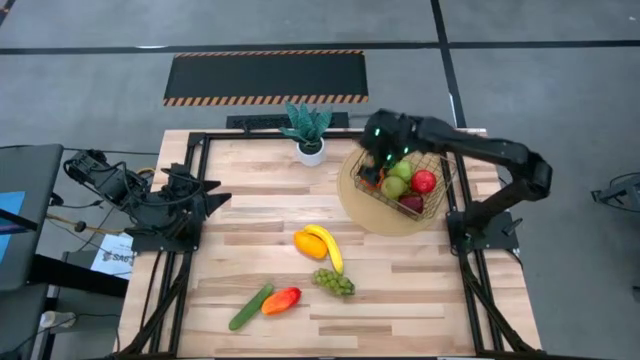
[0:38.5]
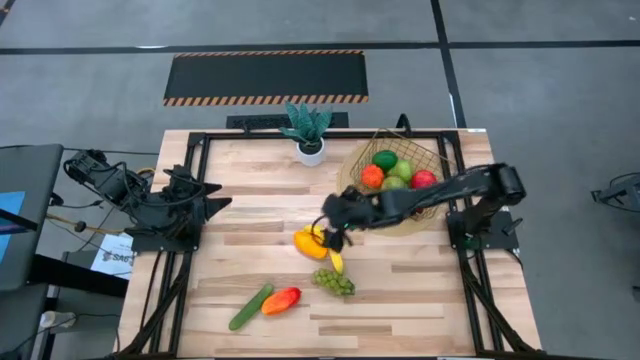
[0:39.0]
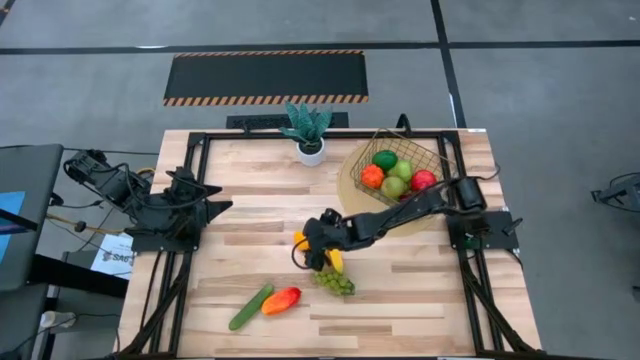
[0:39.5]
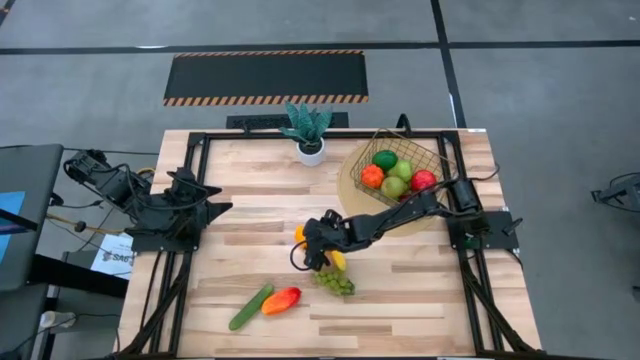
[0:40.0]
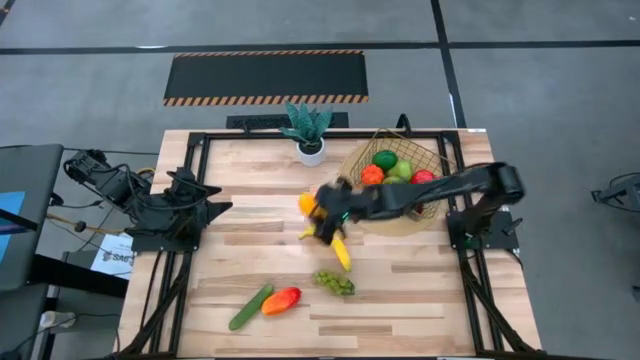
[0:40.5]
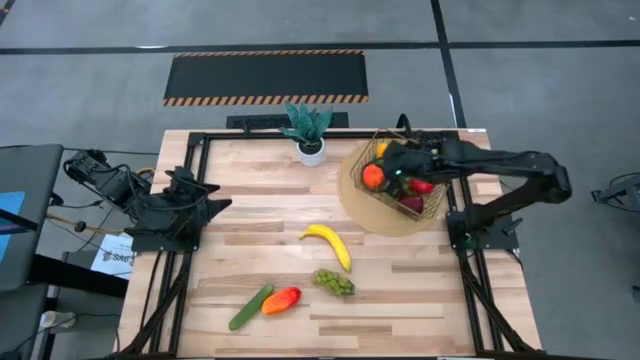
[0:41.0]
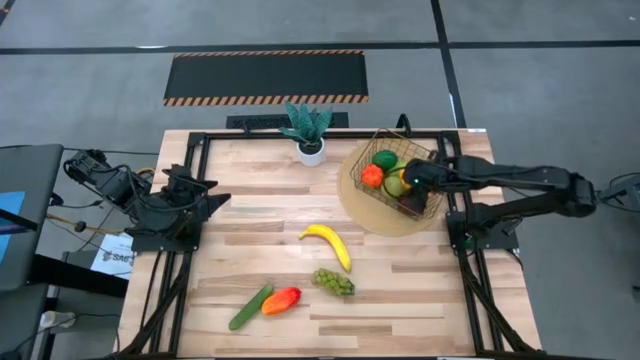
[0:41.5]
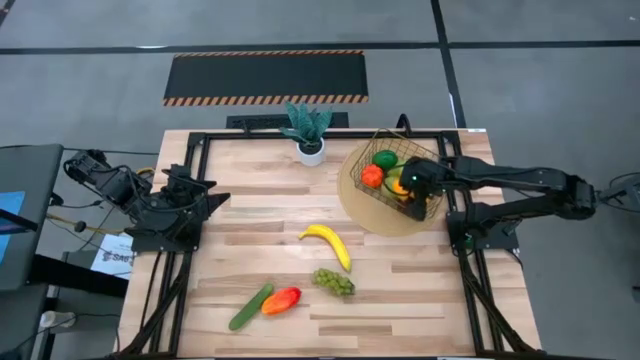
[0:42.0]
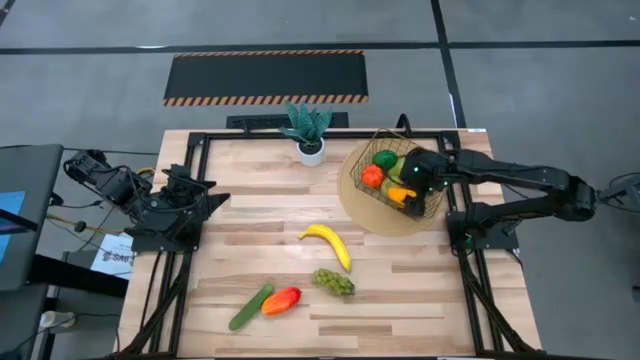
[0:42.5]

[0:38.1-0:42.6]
Task: Build produce basket
Put the yellow mango into the wire basket

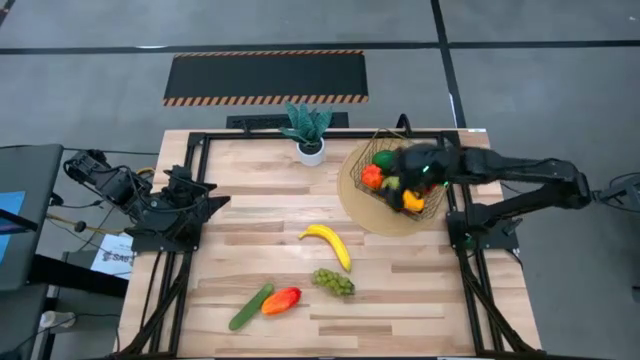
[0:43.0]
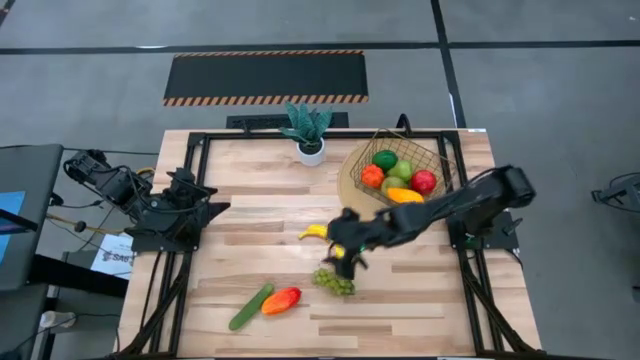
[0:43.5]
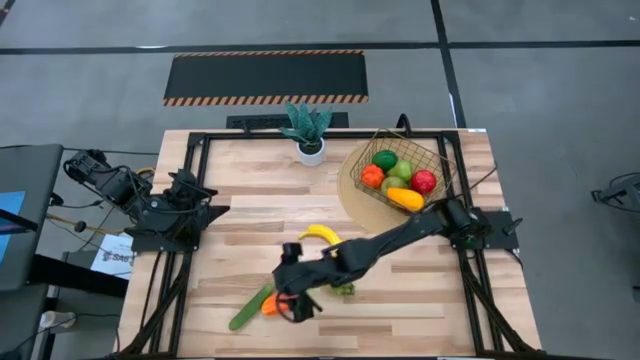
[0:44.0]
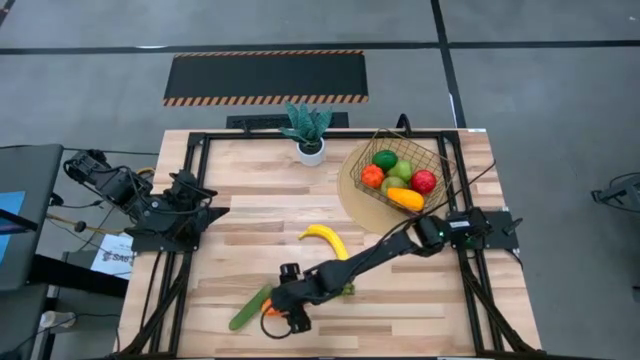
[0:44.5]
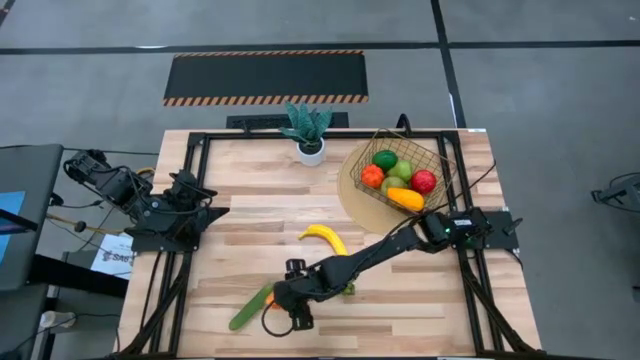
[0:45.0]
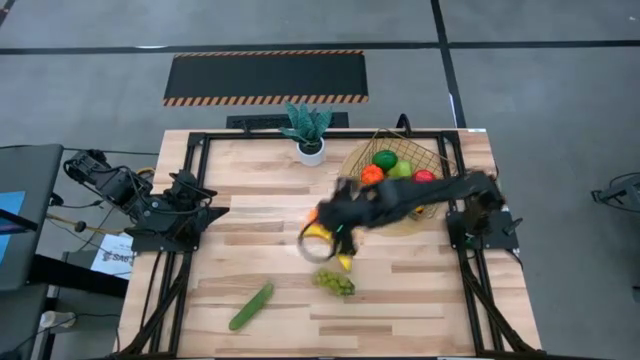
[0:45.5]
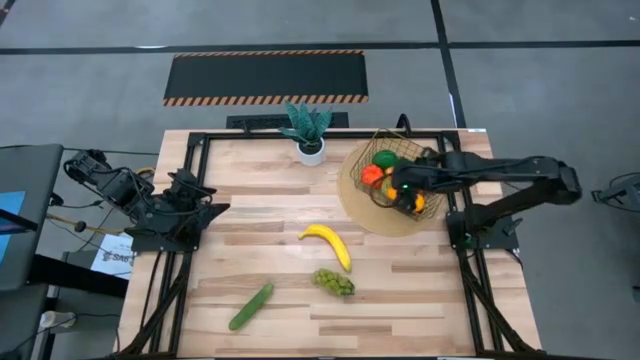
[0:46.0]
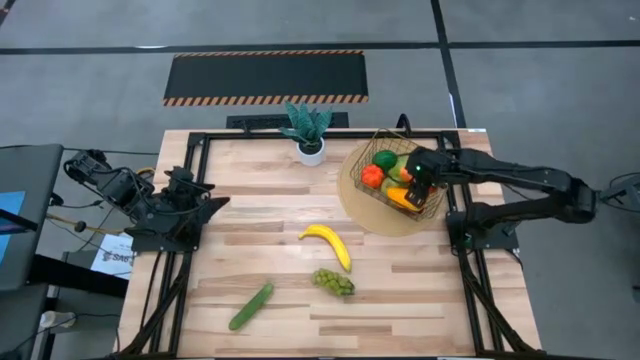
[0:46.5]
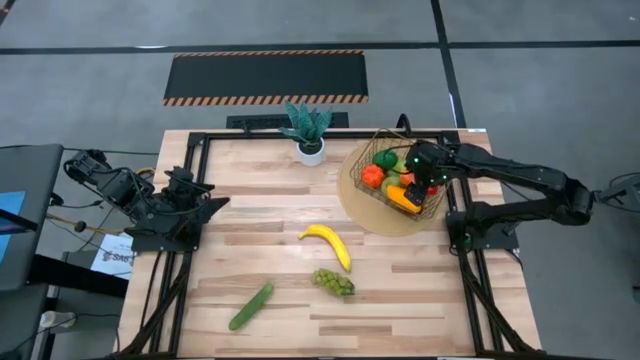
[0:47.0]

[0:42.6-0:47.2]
Put the orange mango into the wire basket

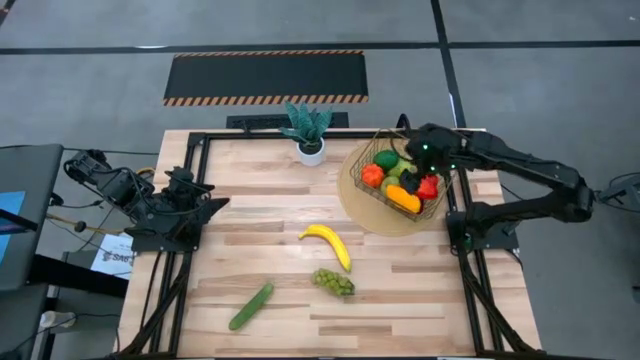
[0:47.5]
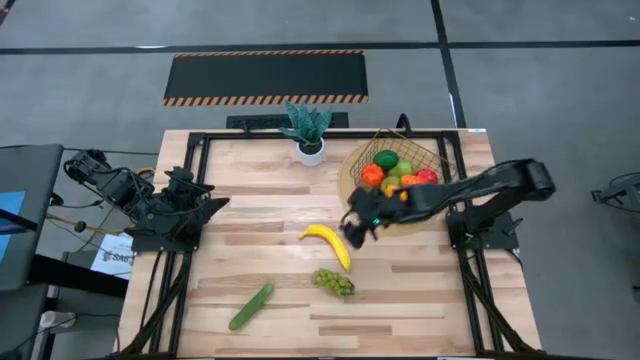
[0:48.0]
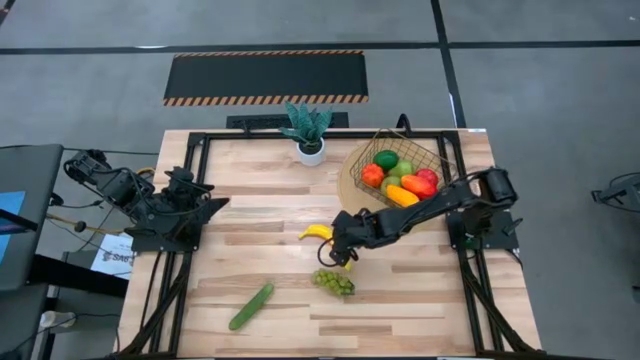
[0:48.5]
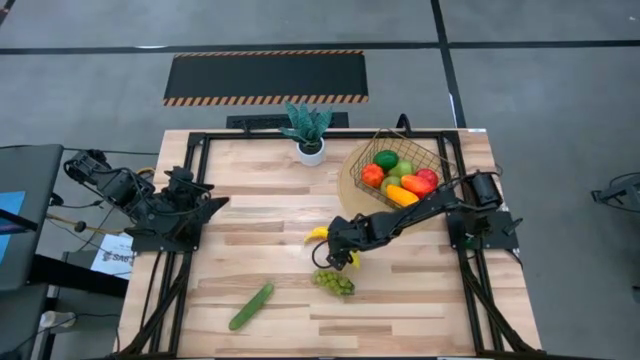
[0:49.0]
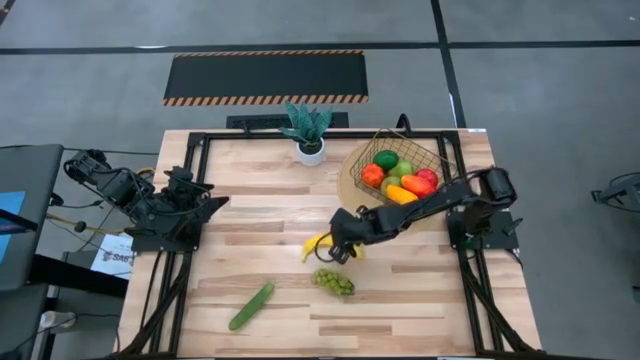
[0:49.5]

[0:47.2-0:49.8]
Put the yellow banana into the wire basket

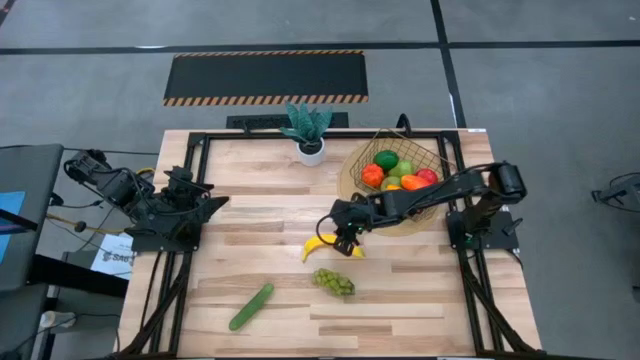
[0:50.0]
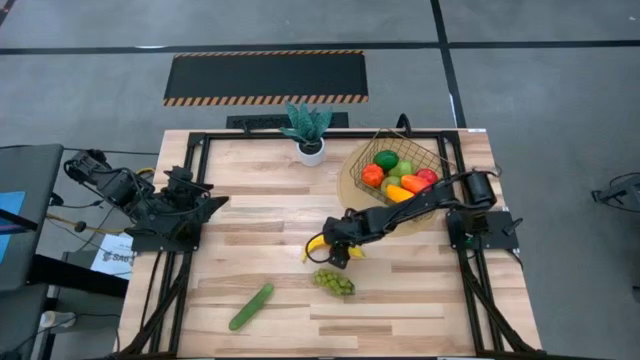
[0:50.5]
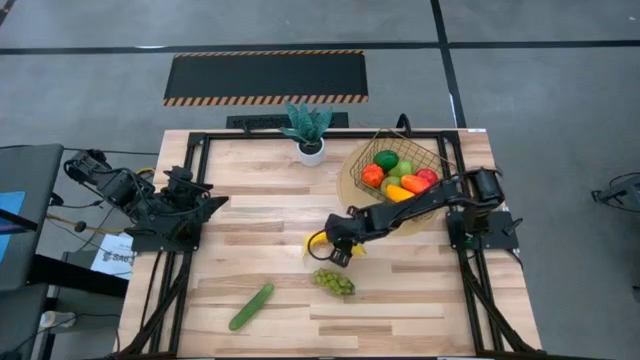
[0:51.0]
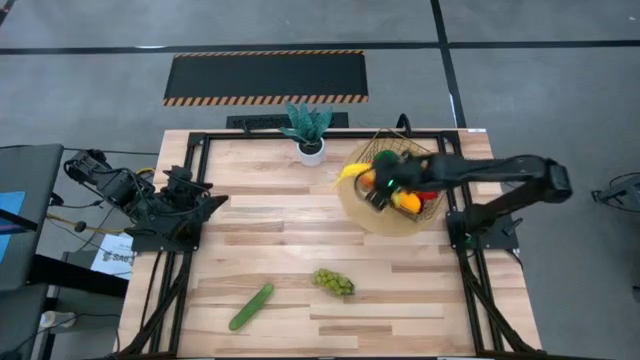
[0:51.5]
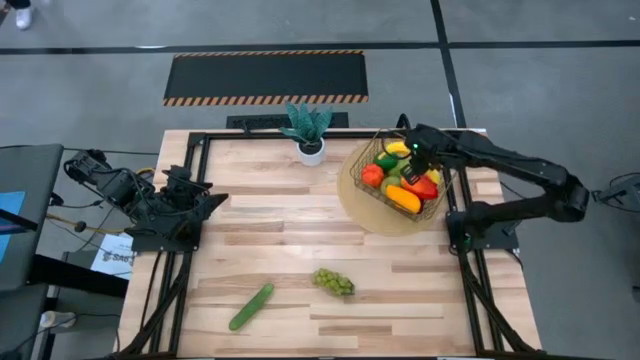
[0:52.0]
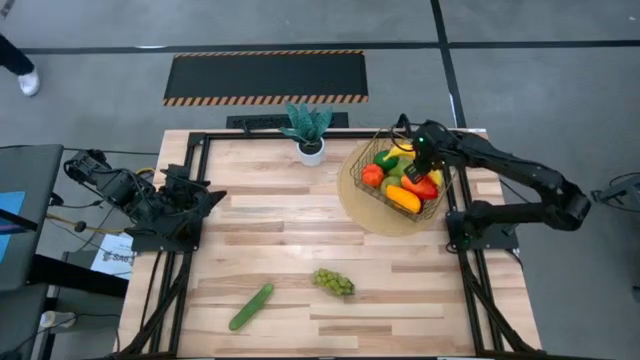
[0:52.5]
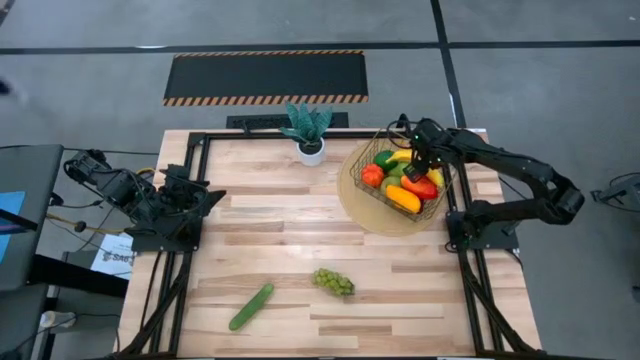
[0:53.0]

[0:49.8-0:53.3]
Put the yellow banana into the wire basket

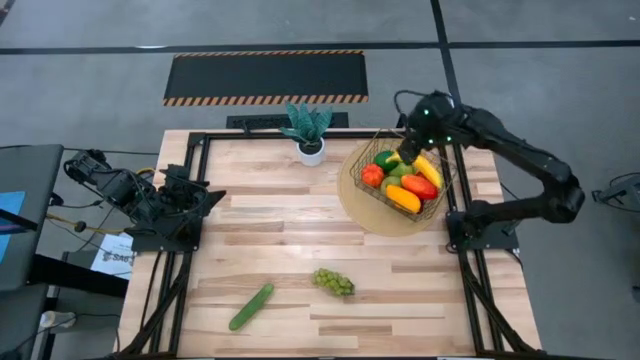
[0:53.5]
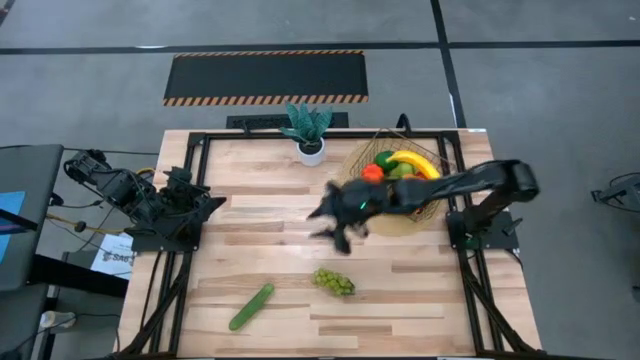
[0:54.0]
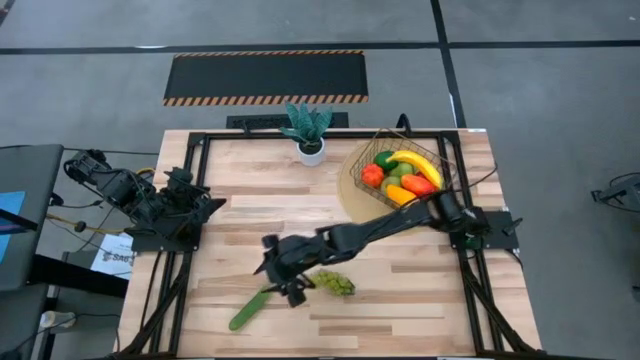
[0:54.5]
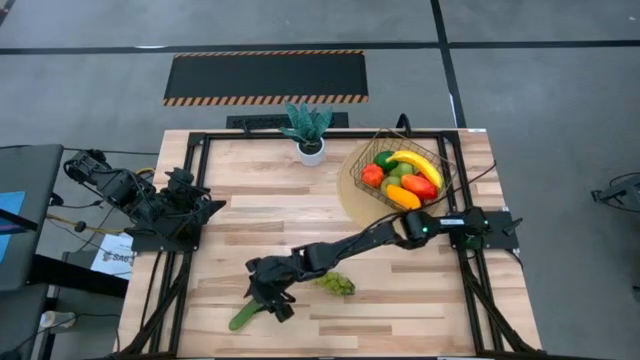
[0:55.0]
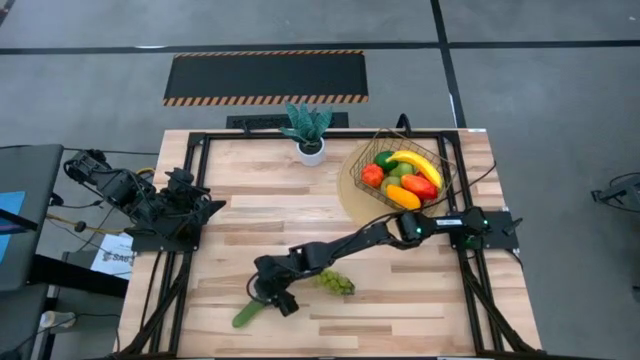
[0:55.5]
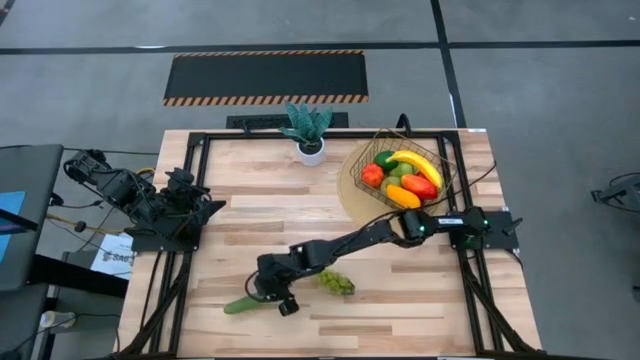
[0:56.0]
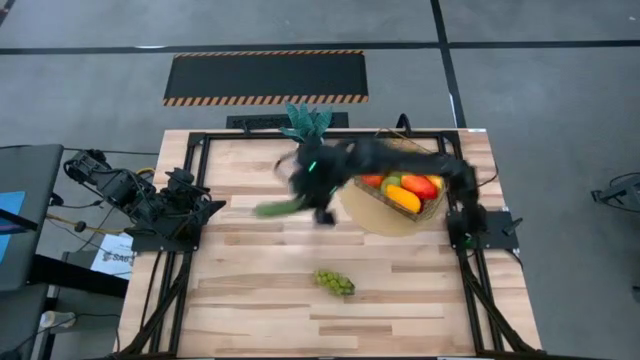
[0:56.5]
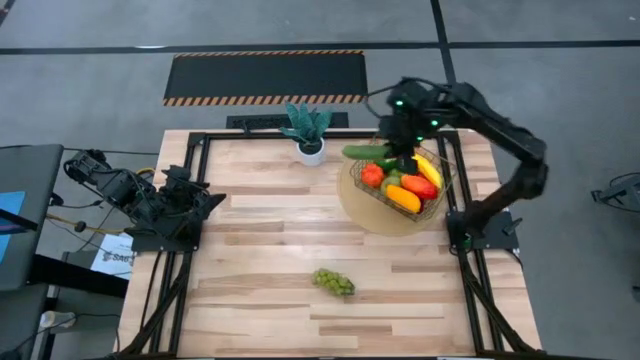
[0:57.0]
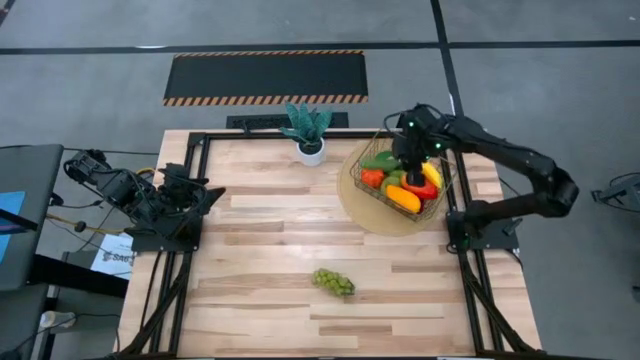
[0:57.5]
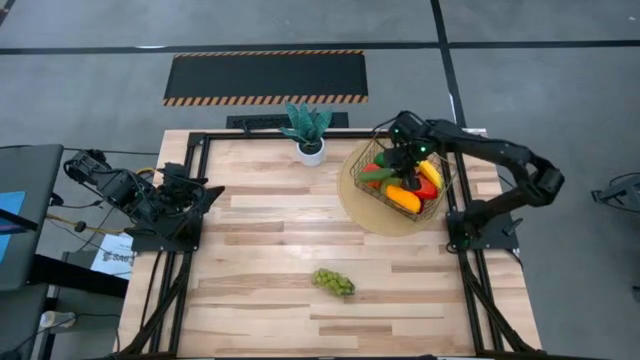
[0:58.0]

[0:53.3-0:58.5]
Put the green cucumber into the wire basket
